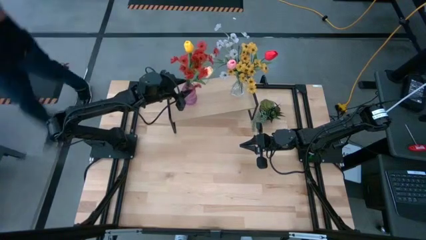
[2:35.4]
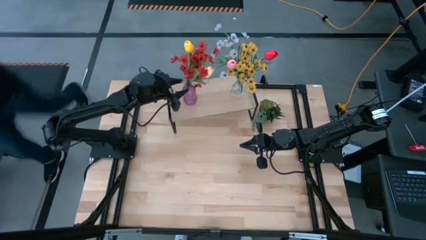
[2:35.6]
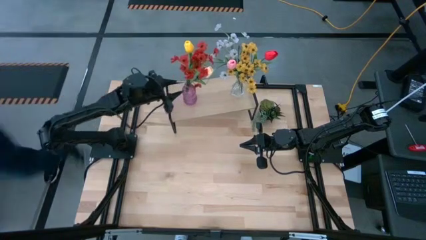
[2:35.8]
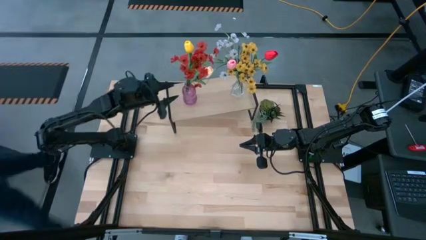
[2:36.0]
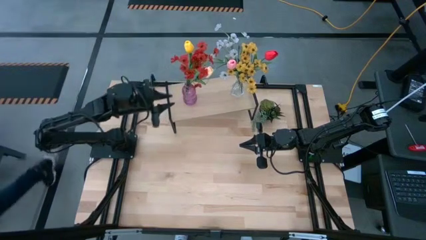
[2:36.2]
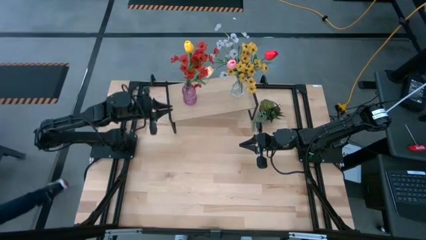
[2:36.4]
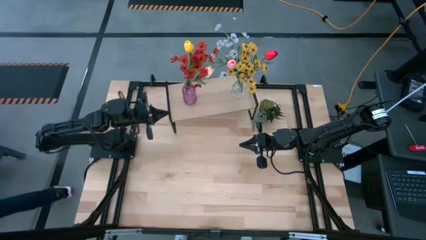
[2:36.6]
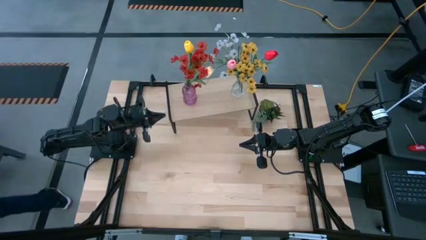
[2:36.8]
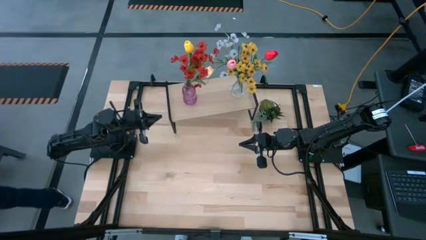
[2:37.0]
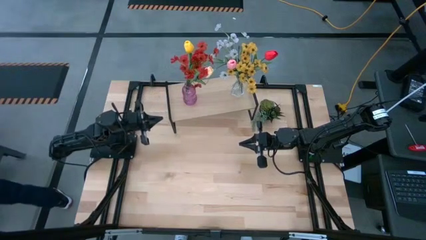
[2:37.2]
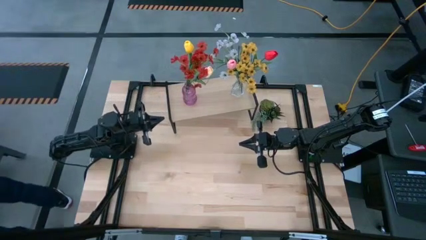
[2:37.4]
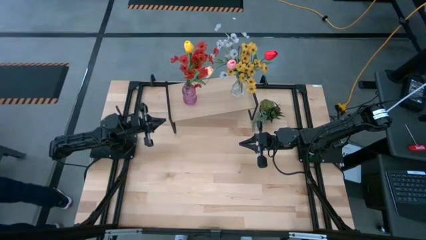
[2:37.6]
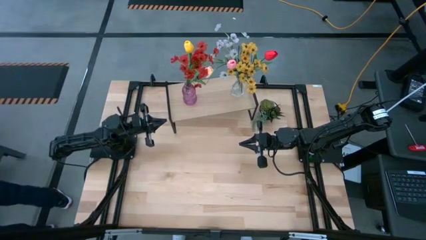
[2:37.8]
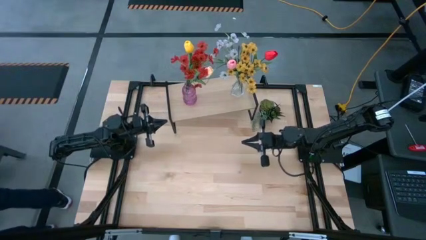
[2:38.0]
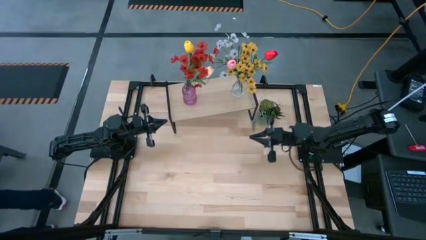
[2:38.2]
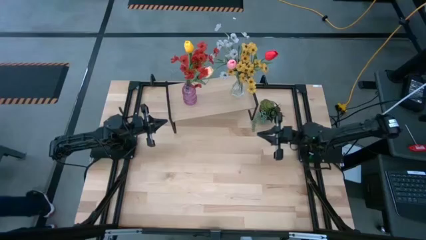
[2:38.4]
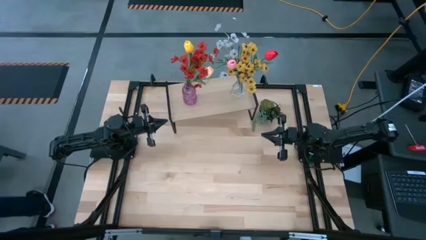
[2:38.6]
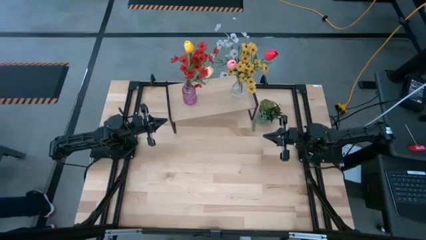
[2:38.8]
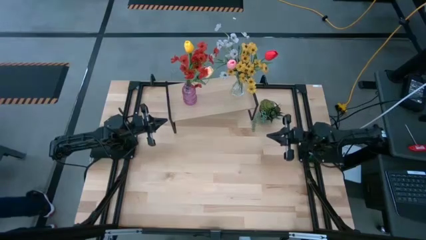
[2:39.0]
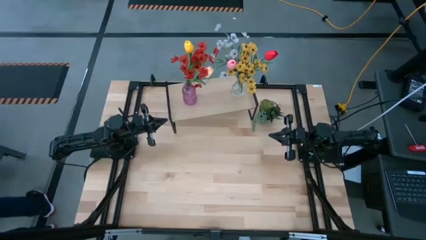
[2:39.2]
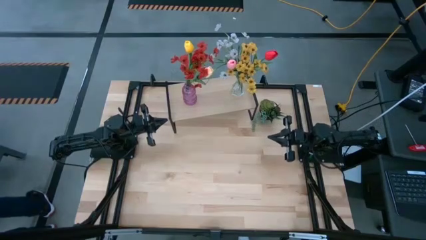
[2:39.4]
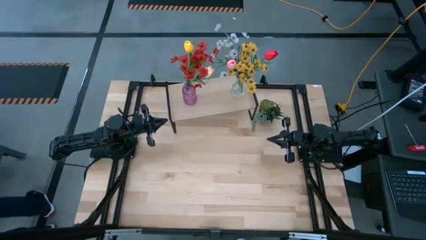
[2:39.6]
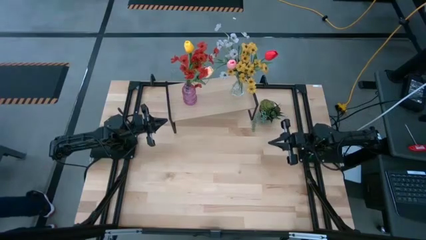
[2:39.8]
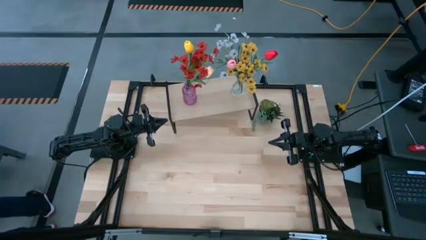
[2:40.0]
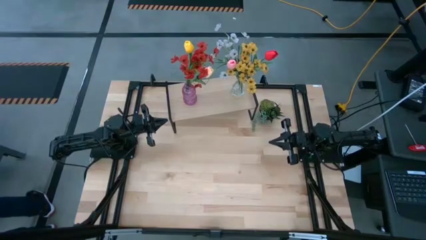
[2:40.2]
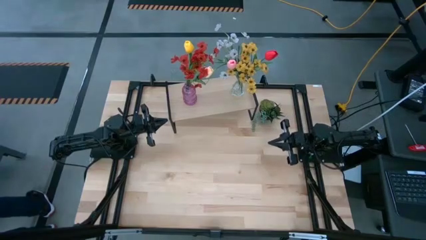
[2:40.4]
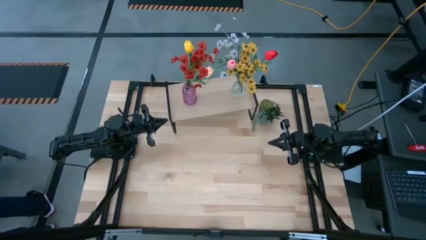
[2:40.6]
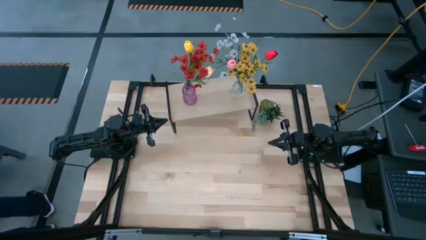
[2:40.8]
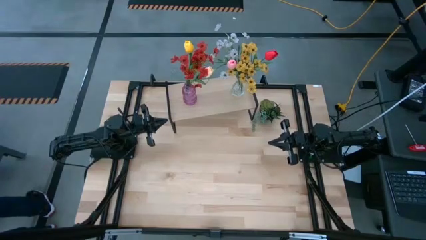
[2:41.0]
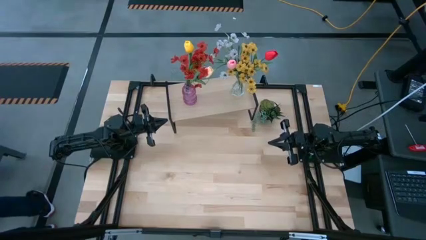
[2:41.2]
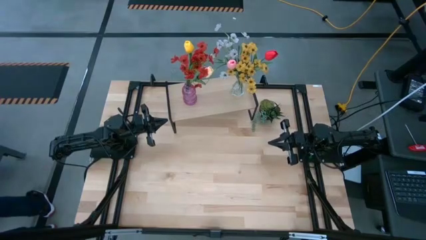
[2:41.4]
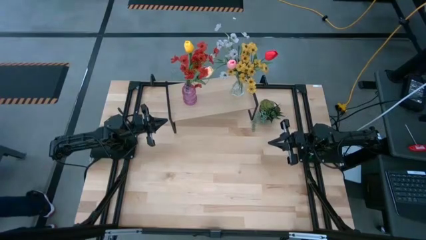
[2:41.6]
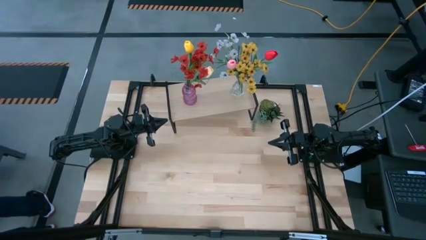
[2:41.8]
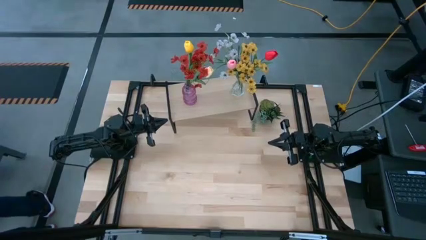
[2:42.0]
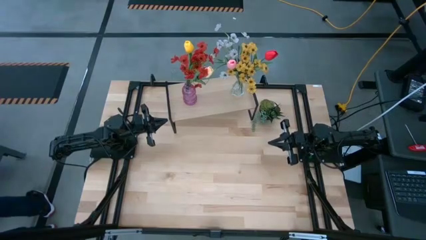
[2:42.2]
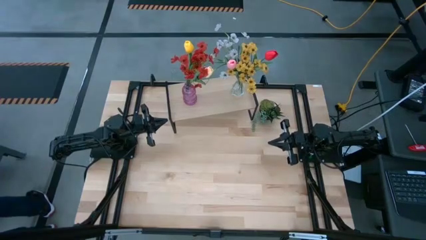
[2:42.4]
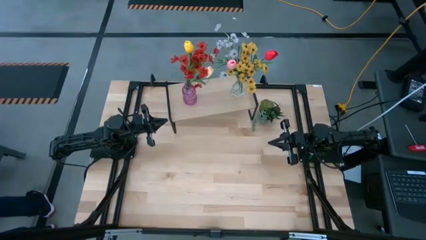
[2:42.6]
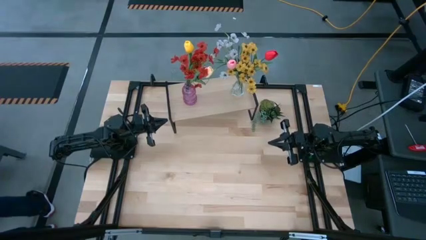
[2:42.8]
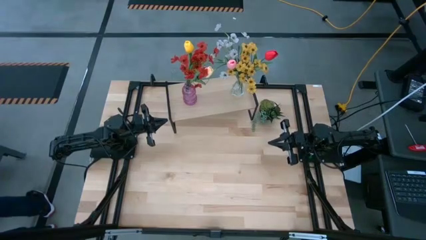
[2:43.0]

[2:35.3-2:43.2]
Task: Pick and place flowers into a vace then onto a shelf
Return to Home Position

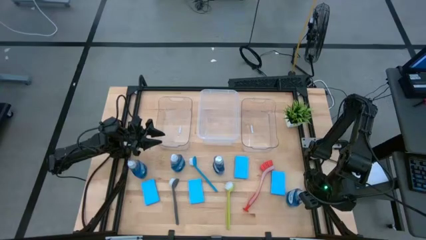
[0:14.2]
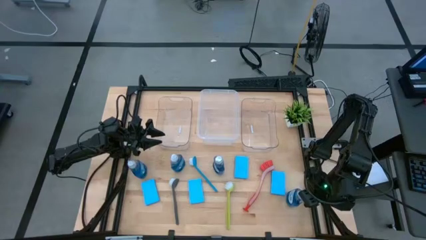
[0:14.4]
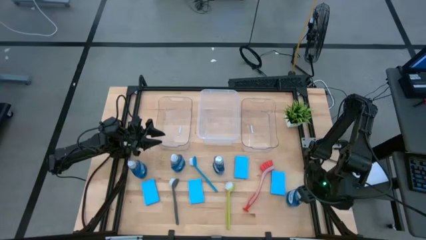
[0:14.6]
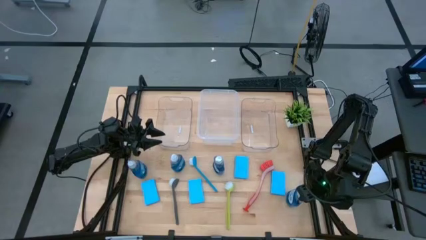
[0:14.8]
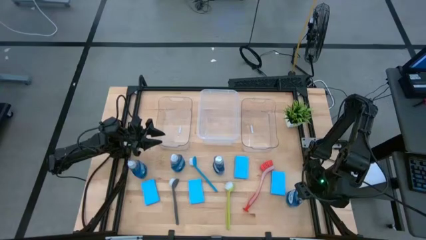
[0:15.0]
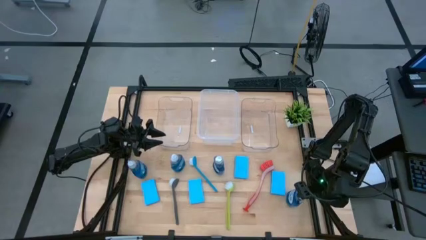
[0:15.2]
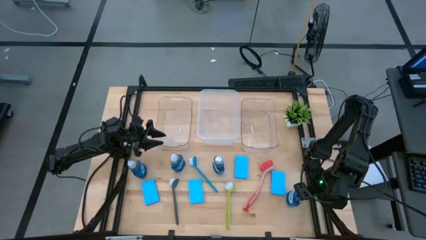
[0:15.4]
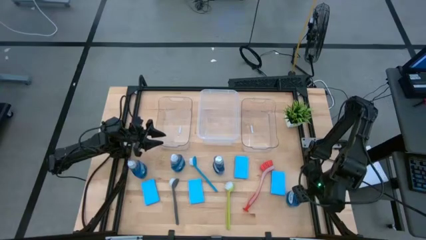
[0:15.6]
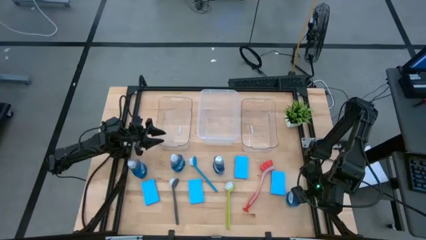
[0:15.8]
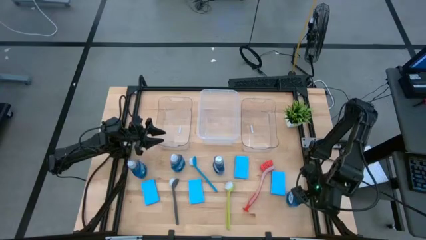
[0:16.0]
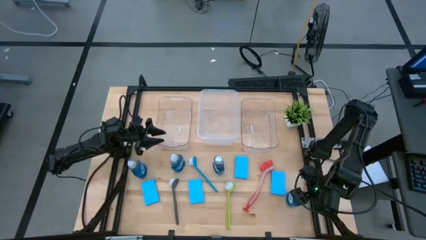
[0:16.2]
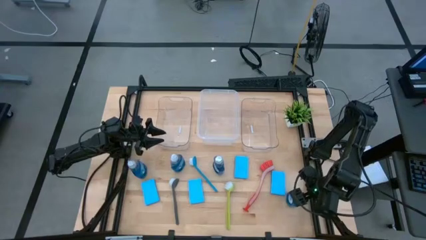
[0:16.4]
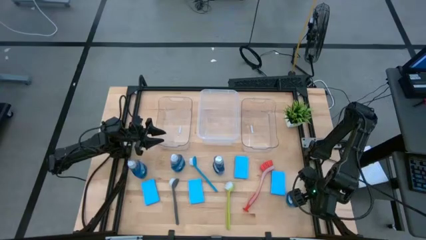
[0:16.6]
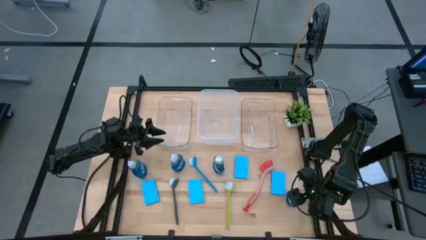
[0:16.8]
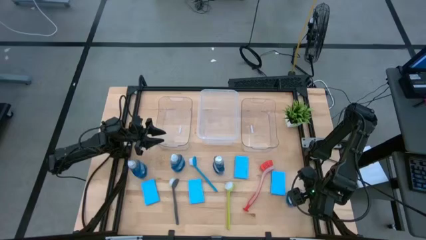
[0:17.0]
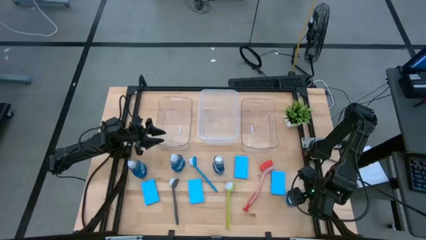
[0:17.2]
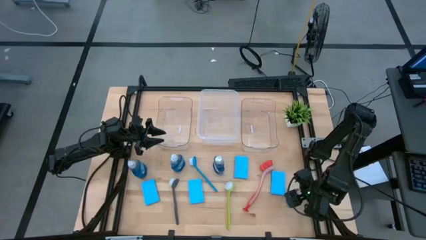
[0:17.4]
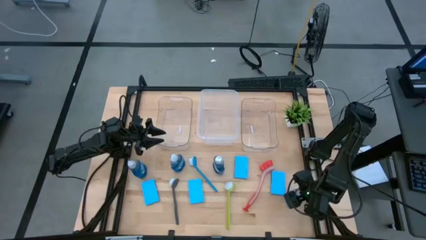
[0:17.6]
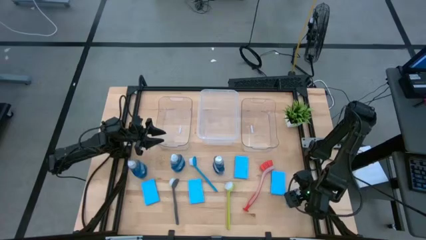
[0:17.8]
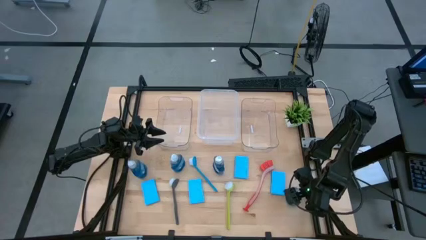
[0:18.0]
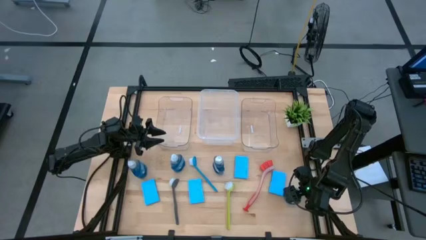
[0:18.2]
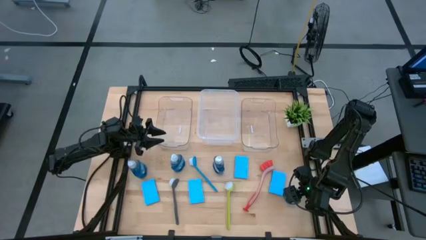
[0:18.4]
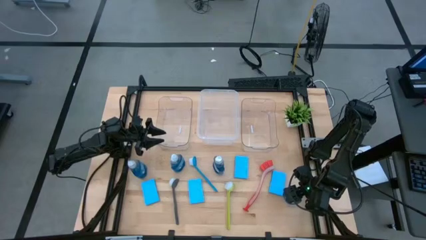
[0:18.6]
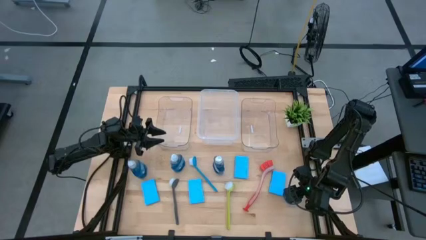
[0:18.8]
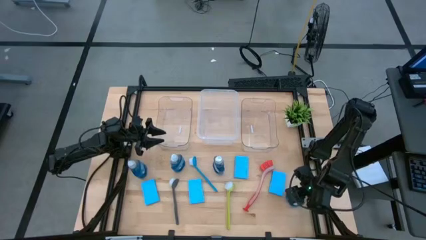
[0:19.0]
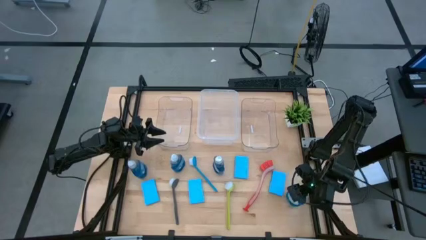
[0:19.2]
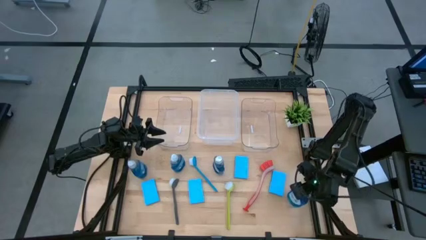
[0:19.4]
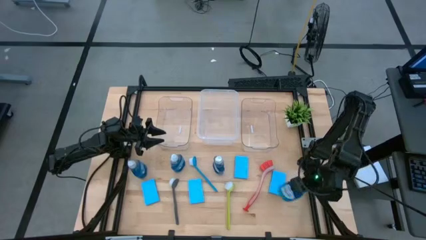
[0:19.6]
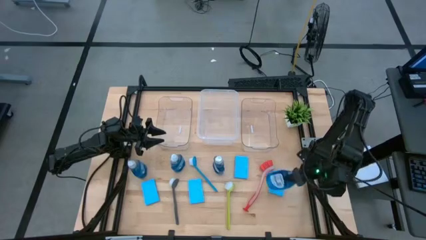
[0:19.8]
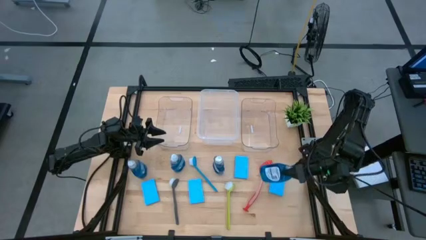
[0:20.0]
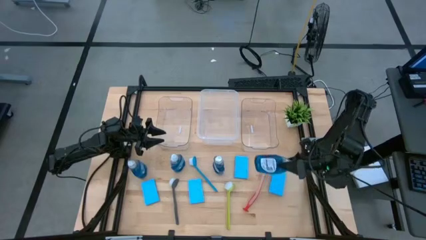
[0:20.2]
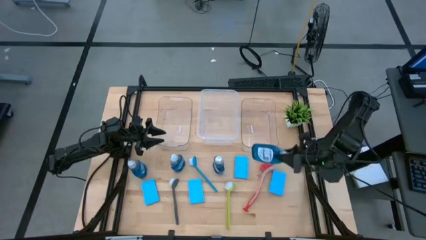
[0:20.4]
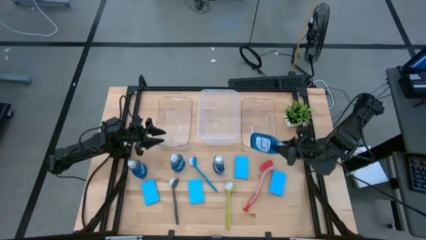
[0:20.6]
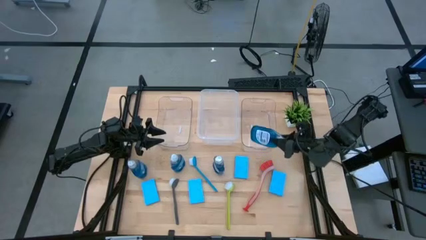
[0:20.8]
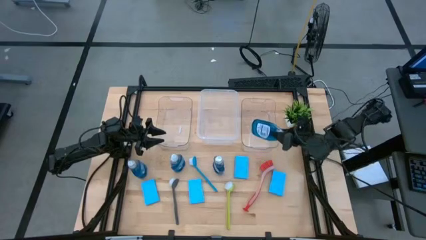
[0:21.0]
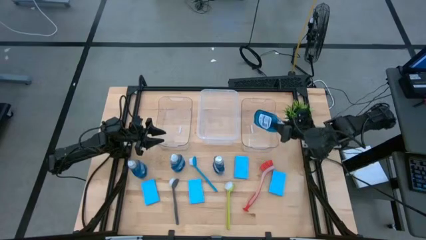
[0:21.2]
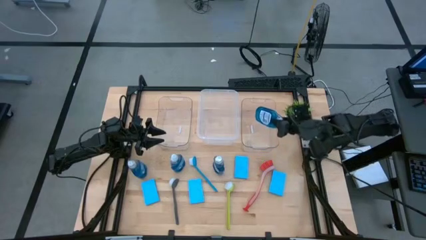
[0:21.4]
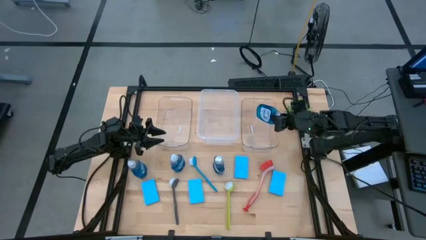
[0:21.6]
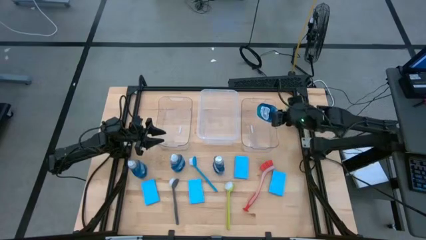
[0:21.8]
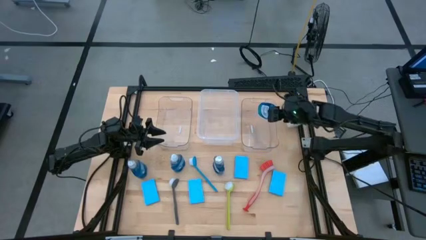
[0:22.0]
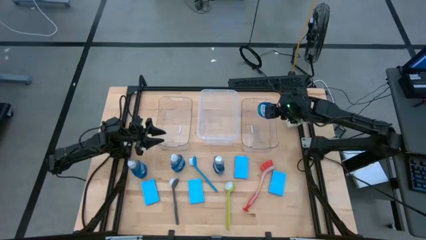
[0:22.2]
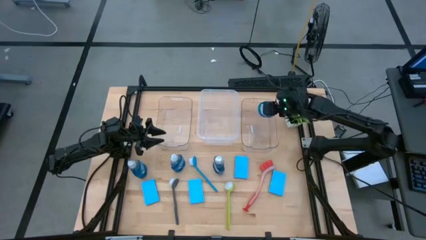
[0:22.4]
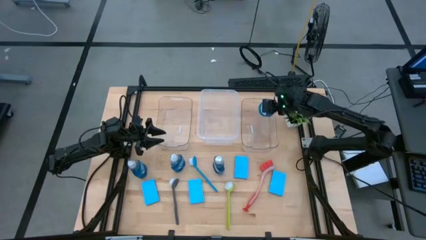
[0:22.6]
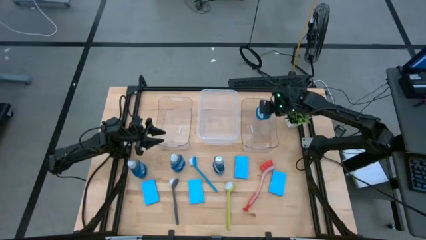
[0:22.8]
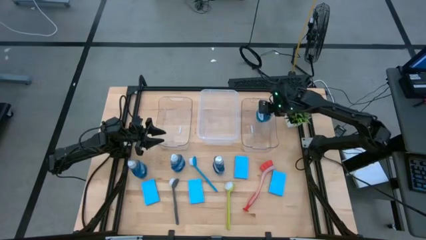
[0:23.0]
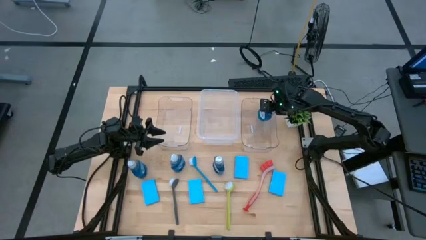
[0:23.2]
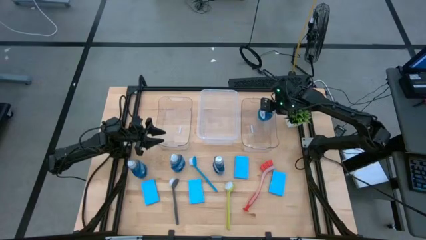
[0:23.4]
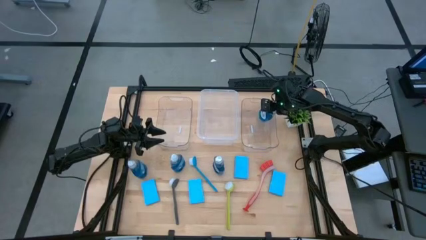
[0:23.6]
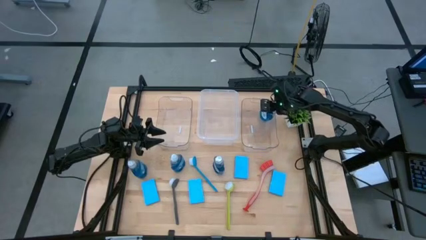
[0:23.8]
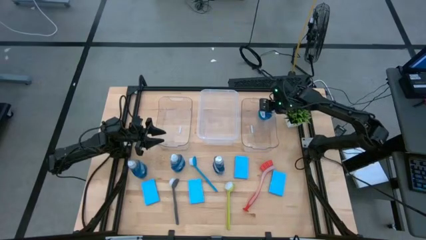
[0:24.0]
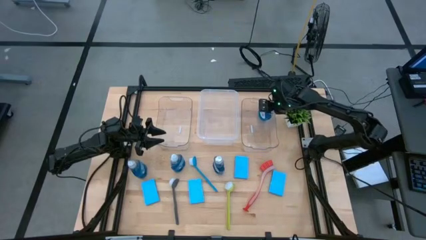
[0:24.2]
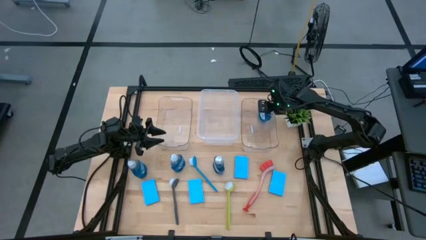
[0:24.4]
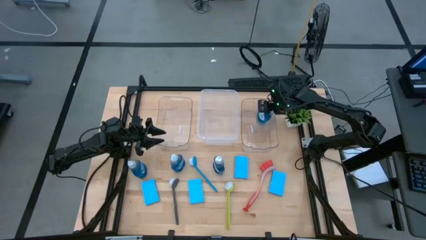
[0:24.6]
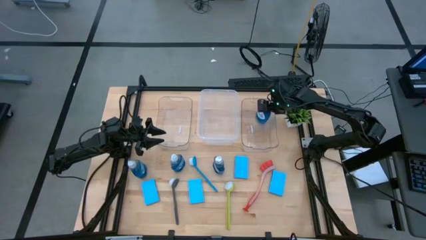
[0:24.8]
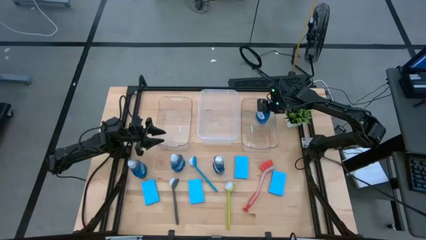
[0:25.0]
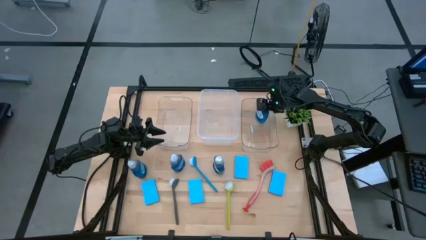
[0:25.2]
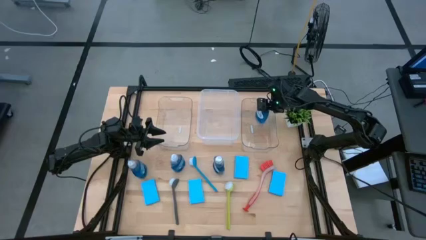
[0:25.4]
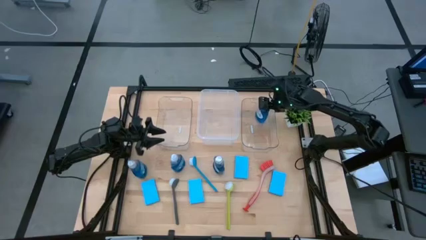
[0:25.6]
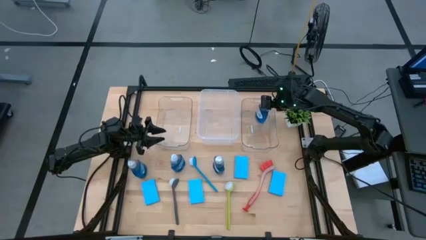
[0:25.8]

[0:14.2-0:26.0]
Task: Pick & Place Kitchen Sink Supplies
Put the blue dishwashing liquid into the right transparent bin
